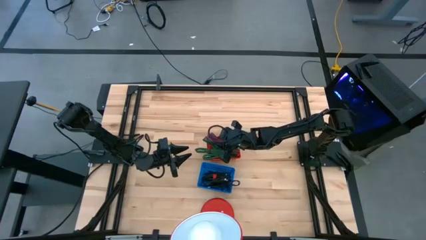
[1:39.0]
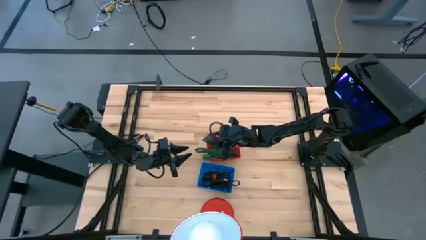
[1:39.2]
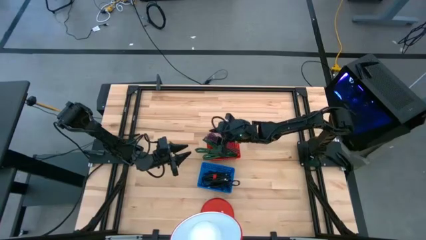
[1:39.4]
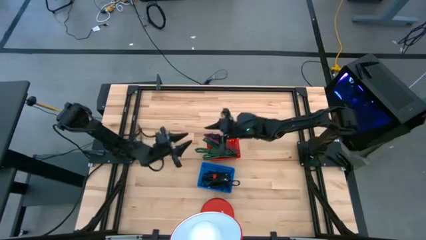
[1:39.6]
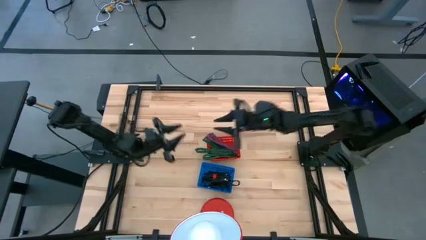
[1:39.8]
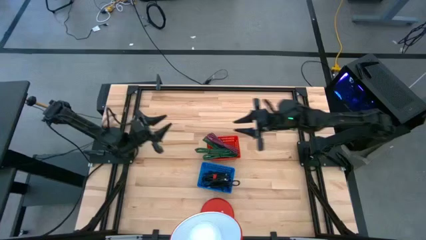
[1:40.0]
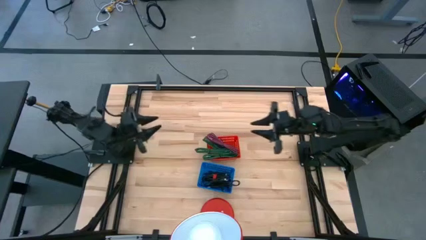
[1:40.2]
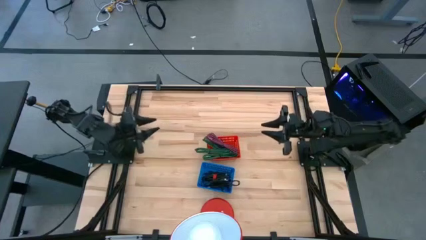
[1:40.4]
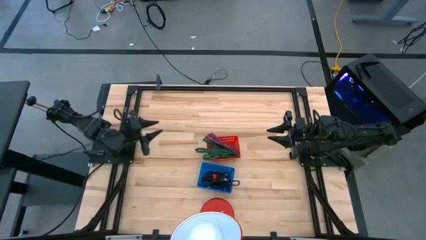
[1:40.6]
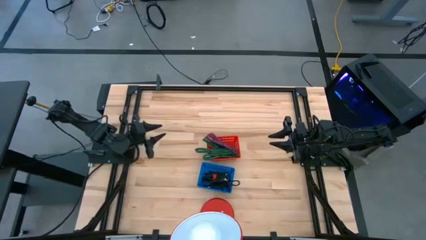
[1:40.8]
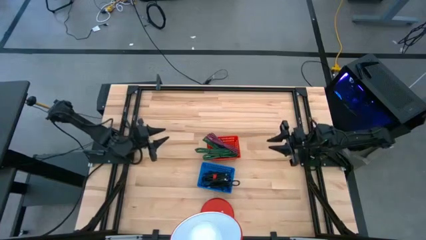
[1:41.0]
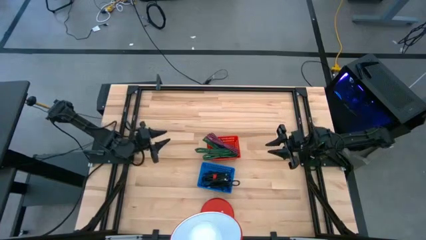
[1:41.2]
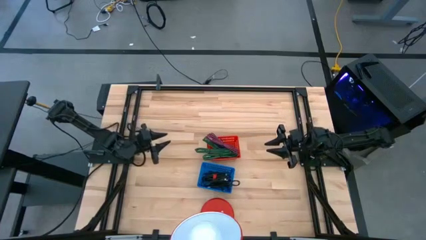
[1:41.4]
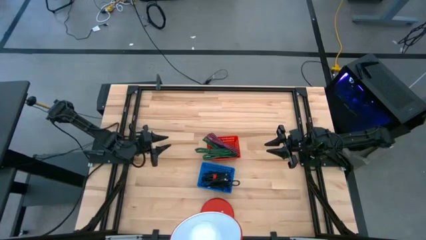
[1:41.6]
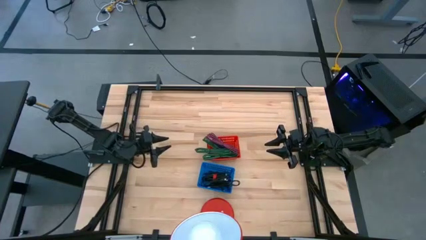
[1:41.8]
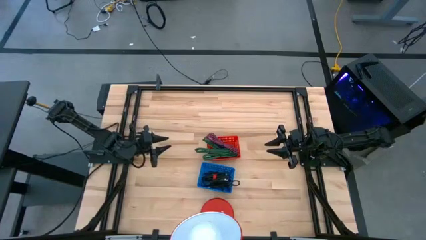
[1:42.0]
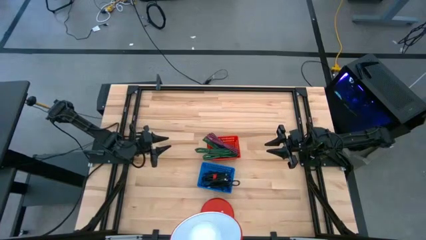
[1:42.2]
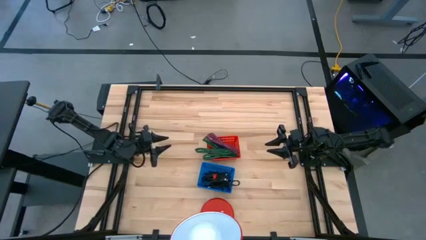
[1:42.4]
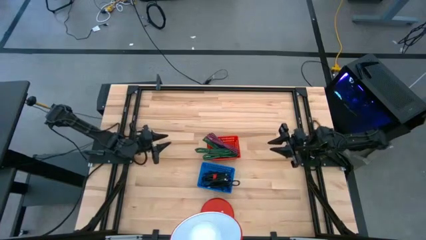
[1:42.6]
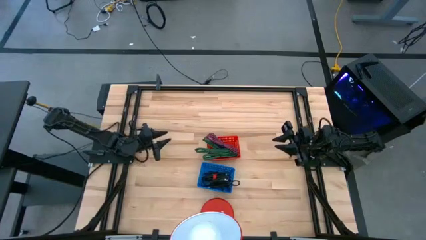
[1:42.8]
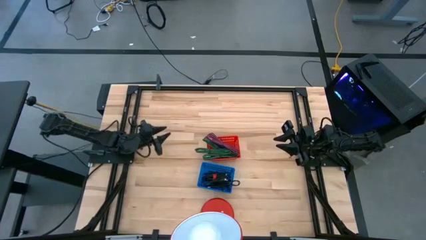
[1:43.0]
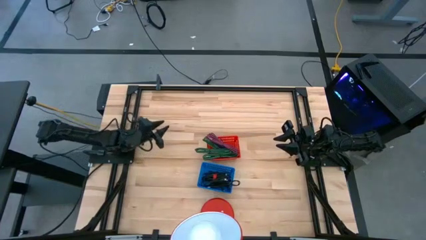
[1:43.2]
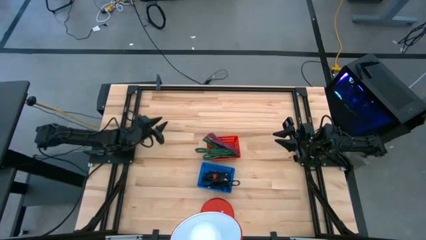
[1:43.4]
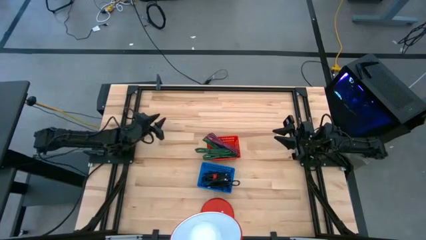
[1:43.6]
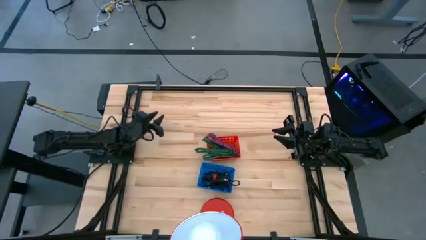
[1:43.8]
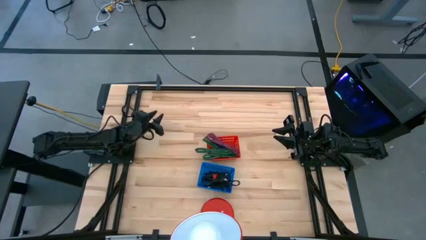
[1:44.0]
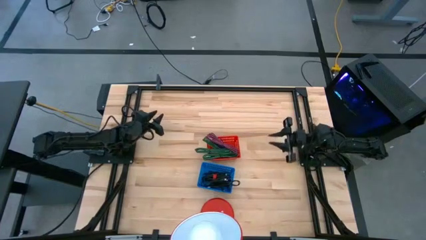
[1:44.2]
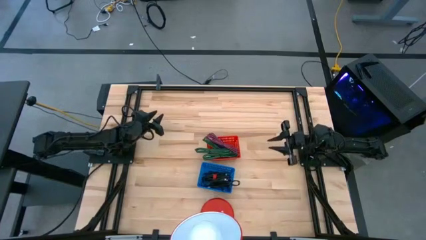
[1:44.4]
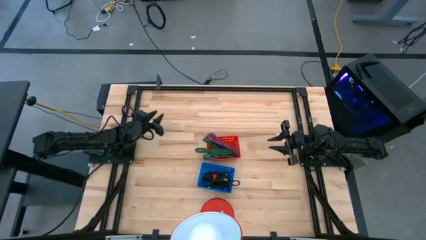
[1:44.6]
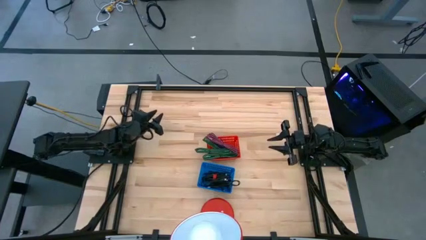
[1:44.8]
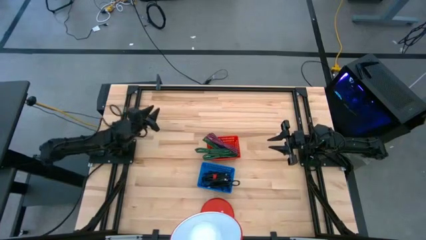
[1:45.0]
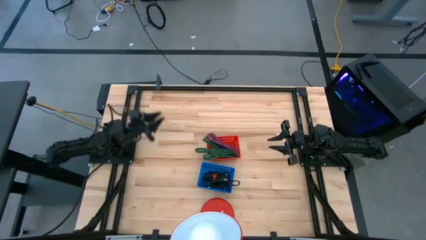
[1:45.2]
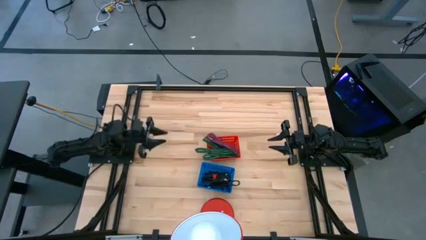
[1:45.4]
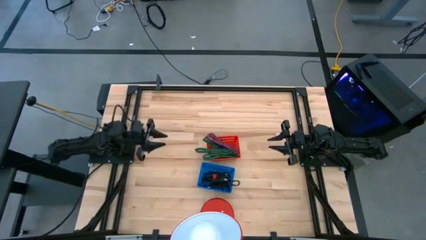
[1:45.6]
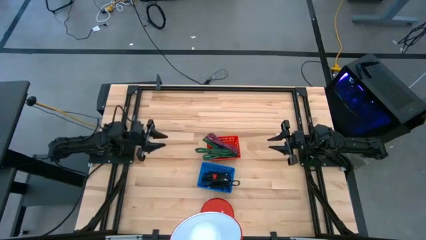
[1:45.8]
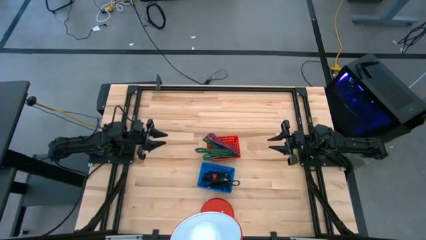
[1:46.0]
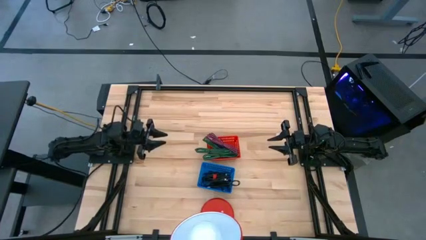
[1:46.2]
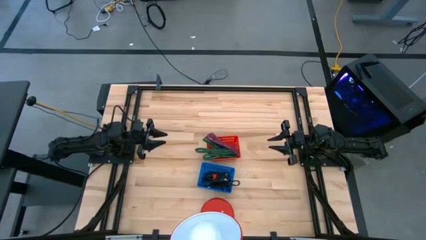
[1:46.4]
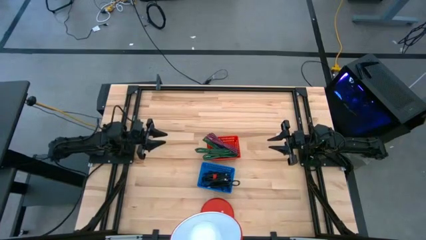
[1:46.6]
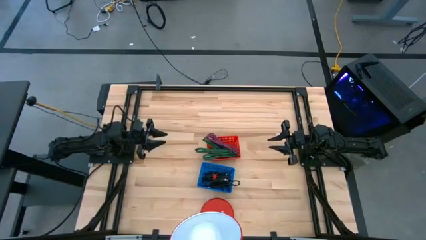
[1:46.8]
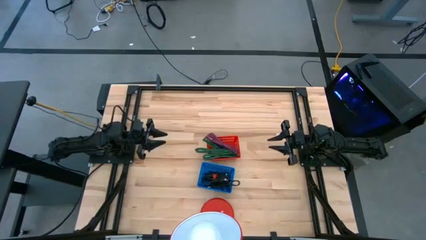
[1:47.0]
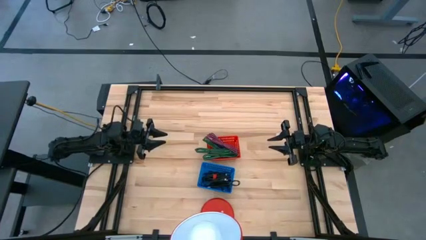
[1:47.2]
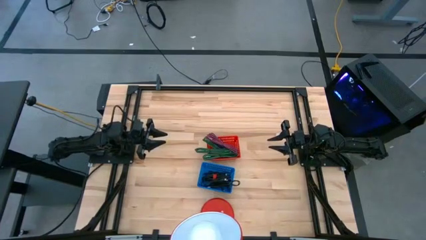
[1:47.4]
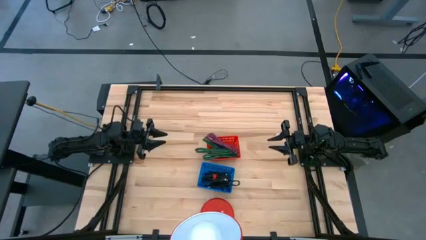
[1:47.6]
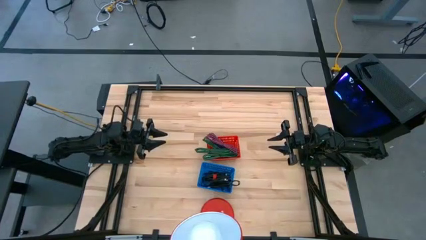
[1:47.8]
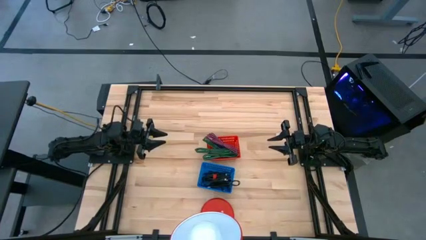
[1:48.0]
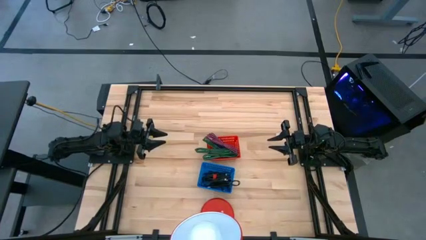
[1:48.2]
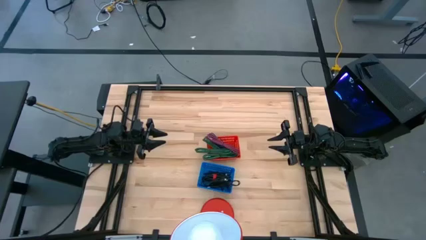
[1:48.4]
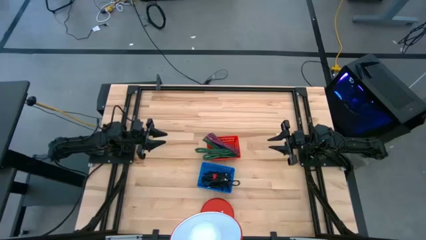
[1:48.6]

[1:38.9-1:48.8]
Task: Pick & Place USB Port
Return to Home Position

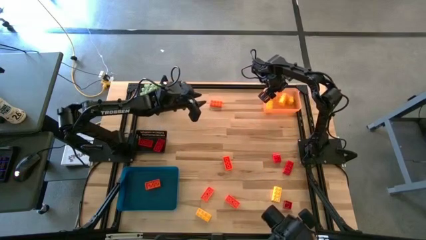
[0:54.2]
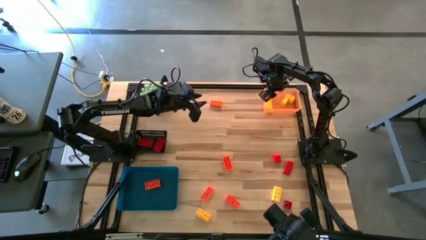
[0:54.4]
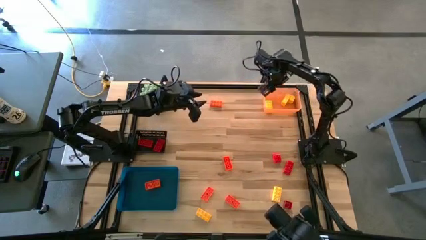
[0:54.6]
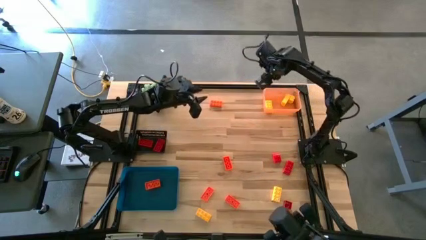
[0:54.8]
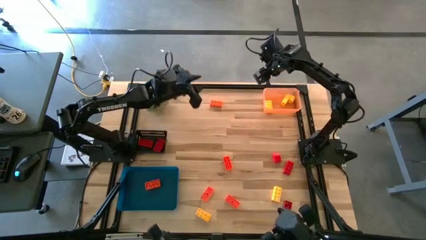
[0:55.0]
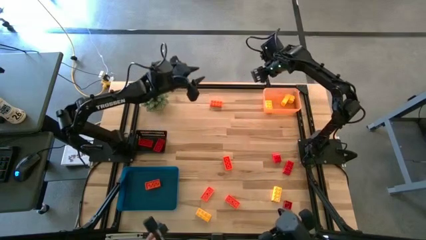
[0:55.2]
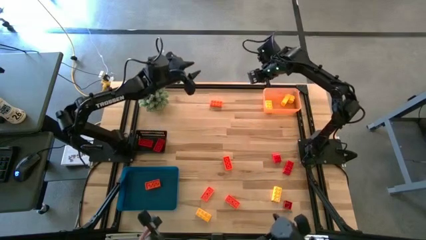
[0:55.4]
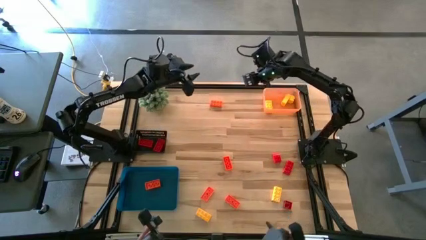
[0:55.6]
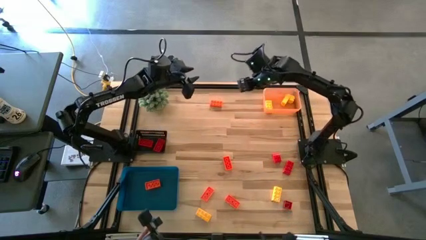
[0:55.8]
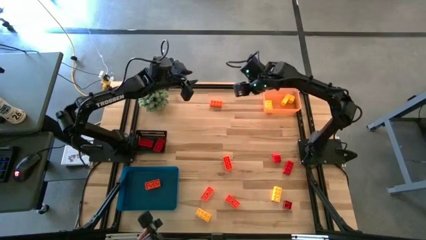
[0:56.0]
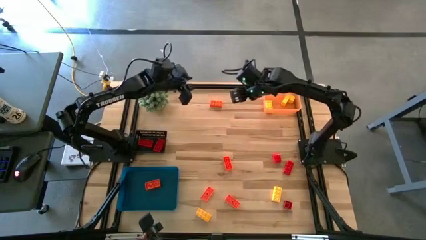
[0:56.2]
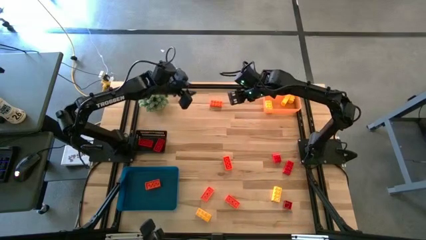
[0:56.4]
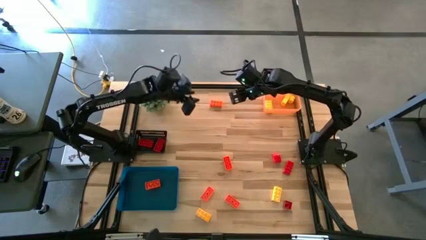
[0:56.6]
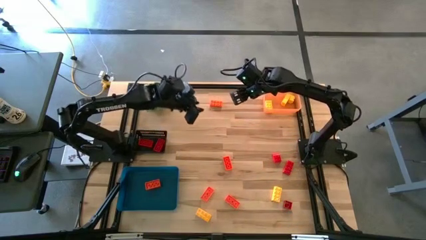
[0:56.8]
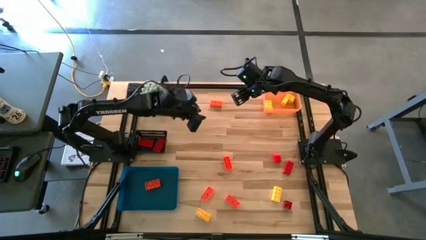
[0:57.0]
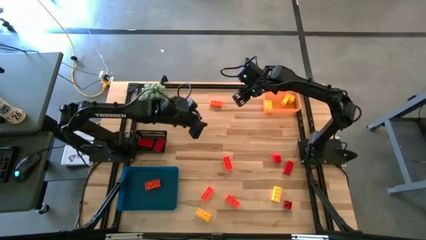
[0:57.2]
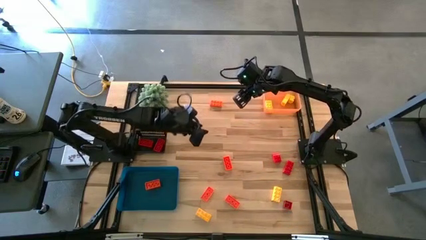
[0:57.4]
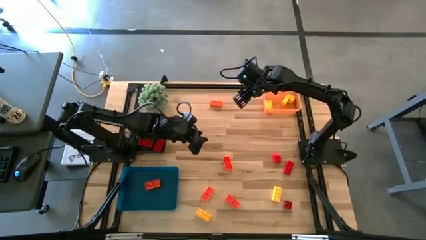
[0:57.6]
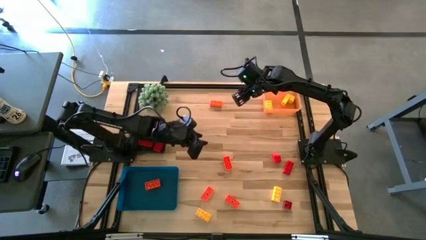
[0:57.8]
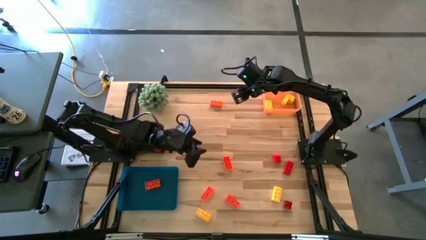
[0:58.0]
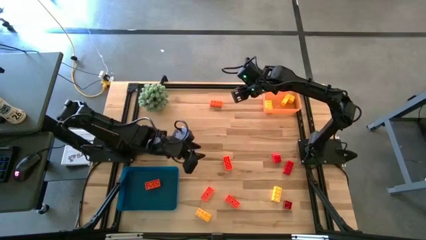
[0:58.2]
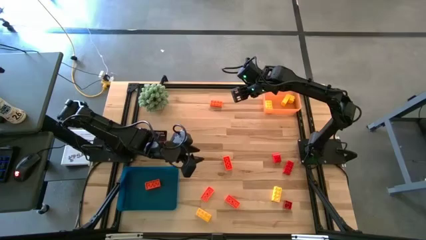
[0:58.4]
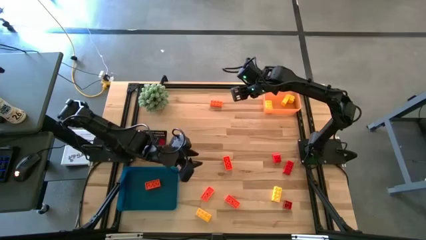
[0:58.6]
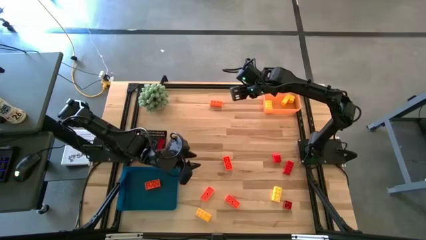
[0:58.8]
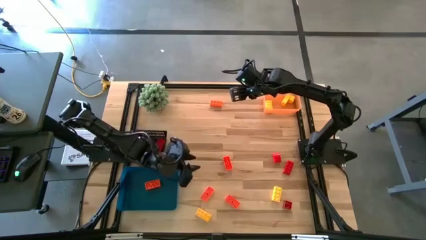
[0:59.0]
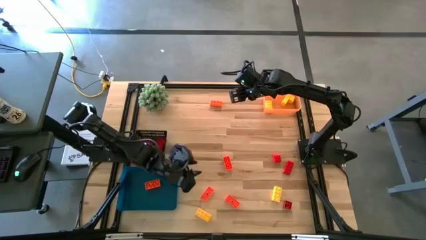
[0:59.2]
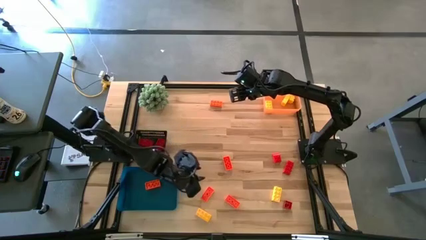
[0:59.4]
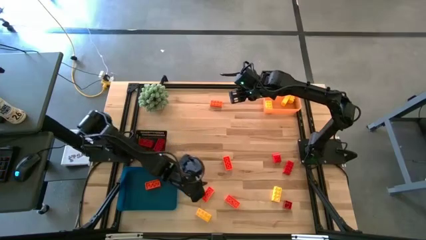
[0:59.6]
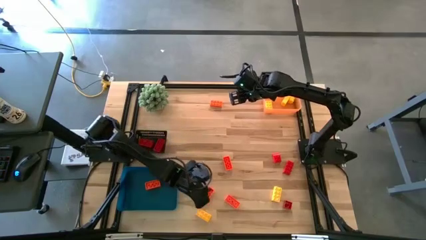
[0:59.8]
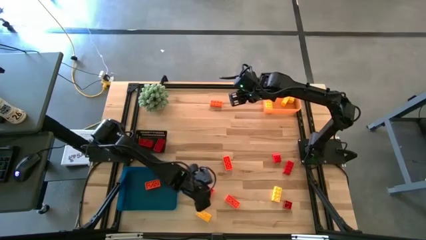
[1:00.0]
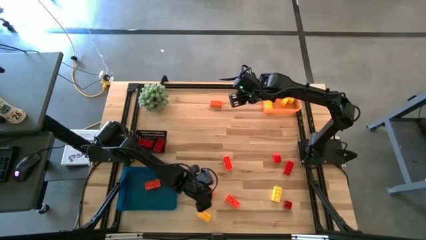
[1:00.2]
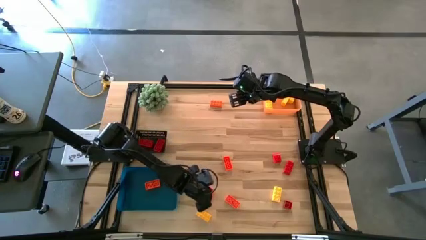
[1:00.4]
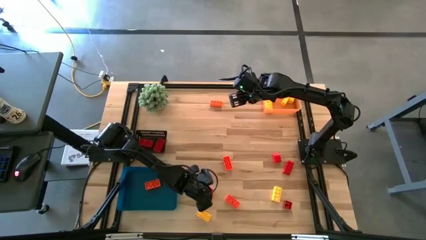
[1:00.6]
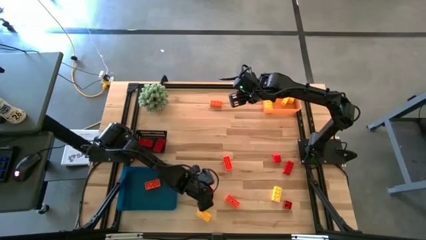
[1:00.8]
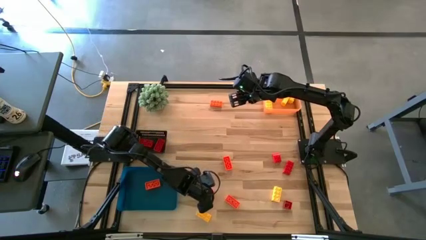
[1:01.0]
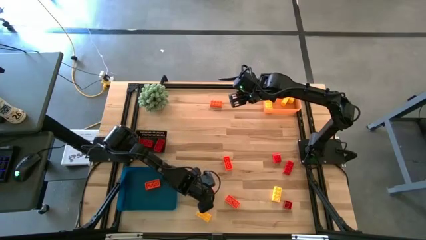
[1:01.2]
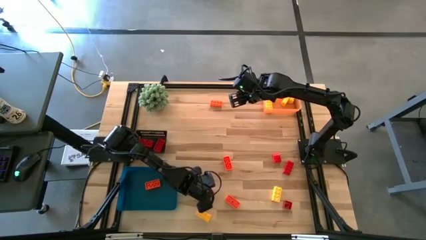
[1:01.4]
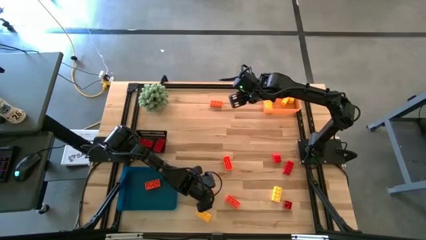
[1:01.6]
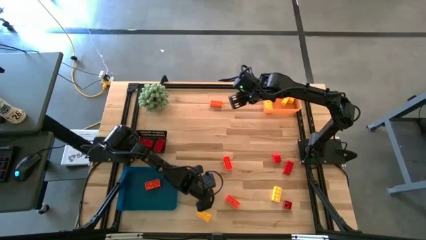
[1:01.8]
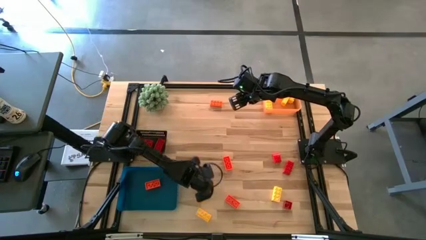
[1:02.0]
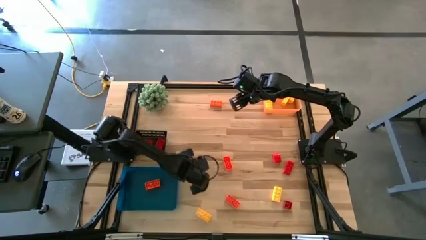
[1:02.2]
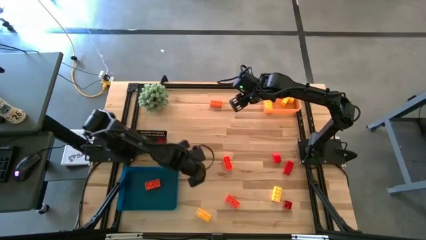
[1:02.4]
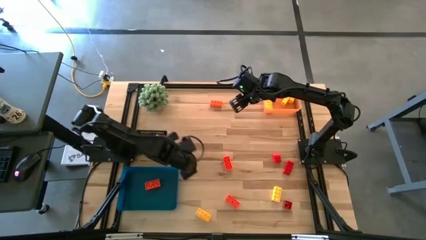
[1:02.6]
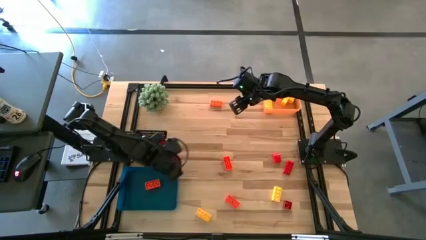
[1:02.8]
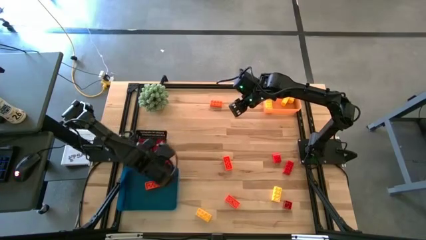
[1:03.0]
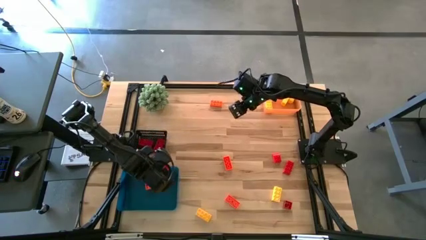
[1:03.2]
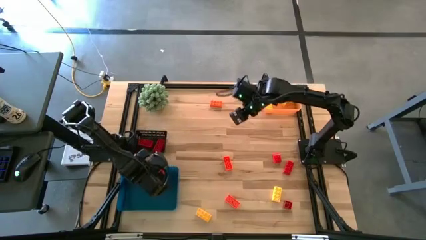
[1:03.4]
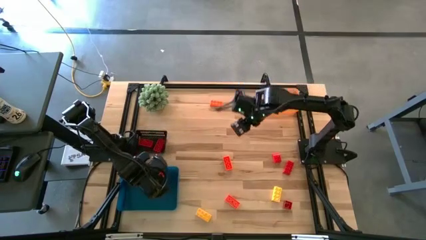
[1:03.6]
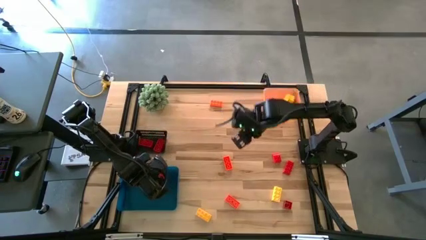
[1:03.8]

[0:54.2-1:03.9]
Task: Sort & place blocks by color
Put the orange game piece into the blue bin
